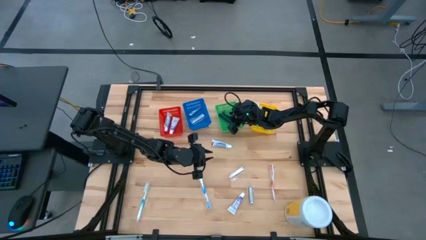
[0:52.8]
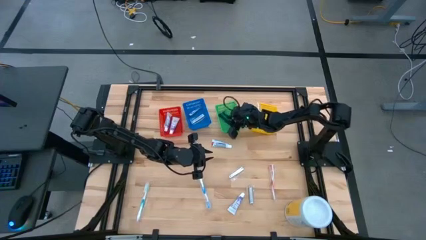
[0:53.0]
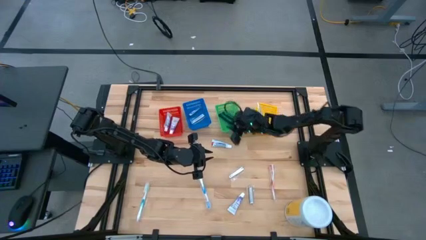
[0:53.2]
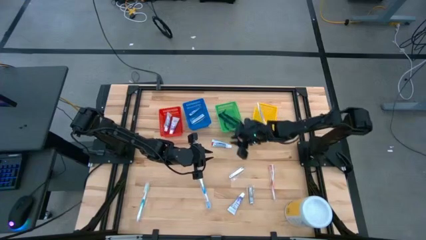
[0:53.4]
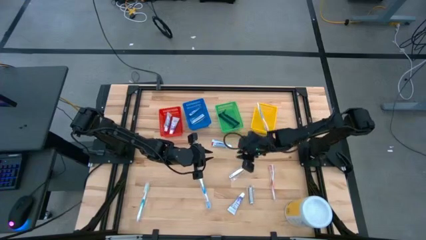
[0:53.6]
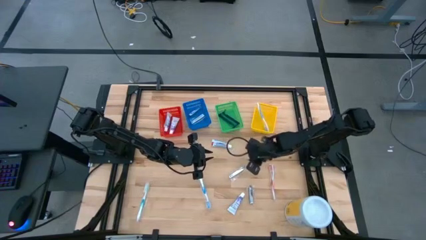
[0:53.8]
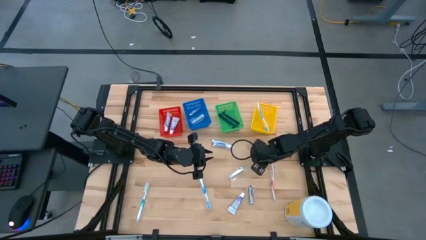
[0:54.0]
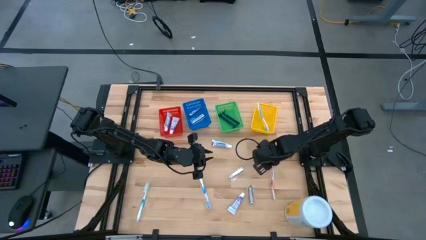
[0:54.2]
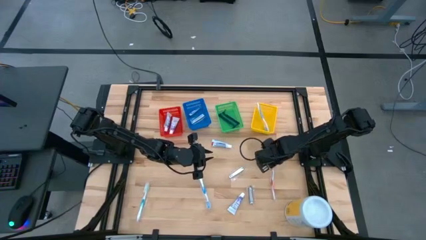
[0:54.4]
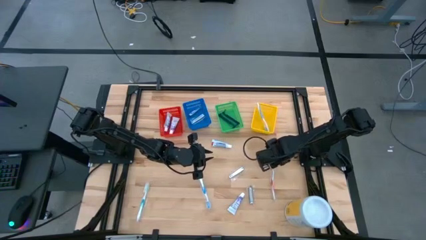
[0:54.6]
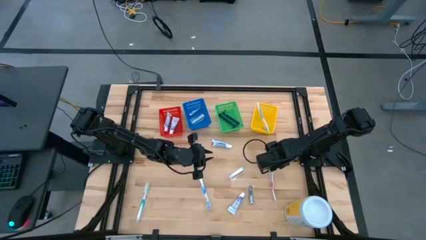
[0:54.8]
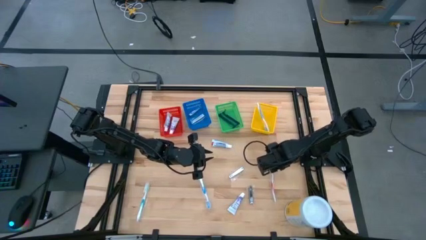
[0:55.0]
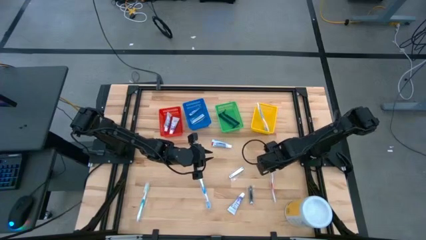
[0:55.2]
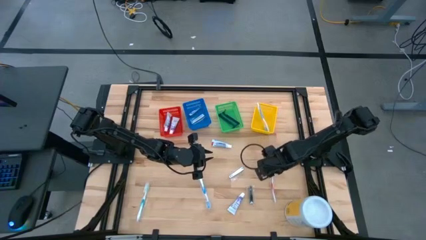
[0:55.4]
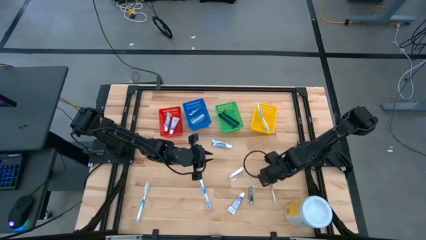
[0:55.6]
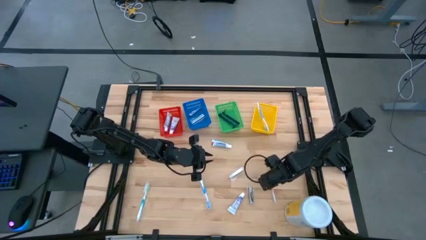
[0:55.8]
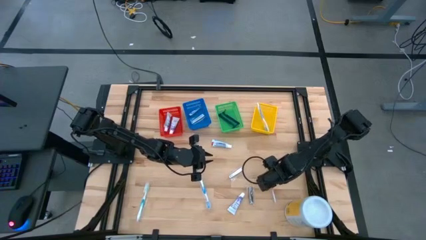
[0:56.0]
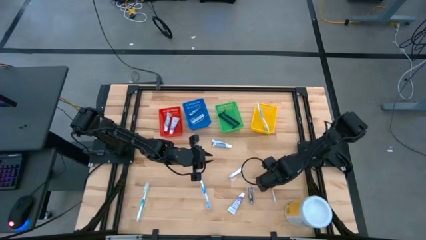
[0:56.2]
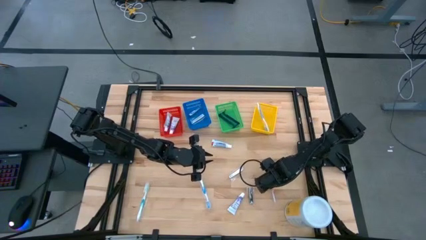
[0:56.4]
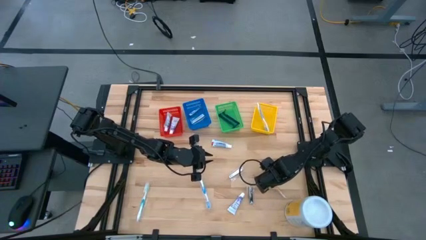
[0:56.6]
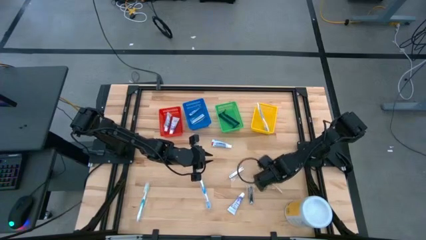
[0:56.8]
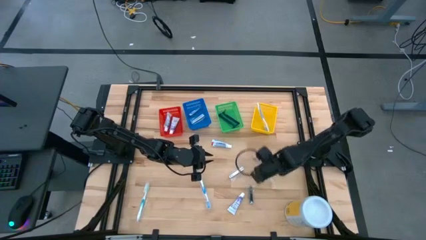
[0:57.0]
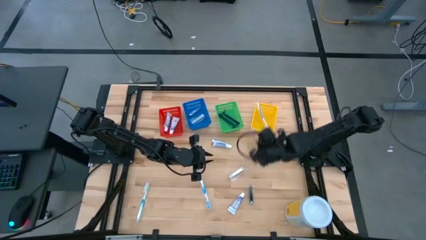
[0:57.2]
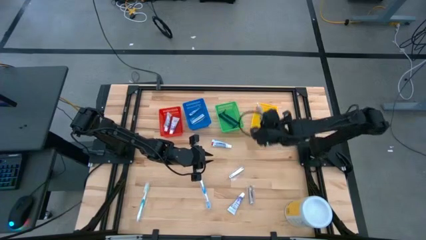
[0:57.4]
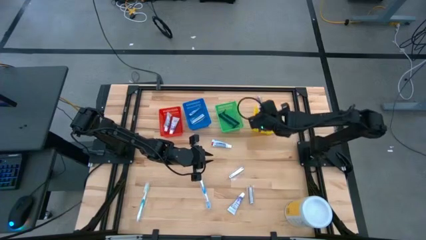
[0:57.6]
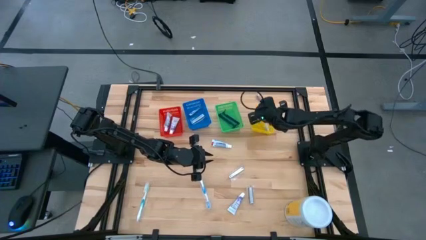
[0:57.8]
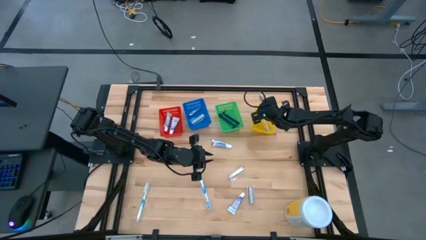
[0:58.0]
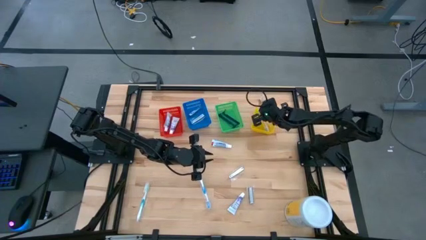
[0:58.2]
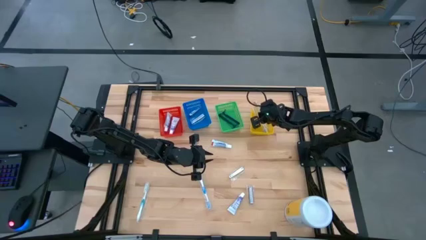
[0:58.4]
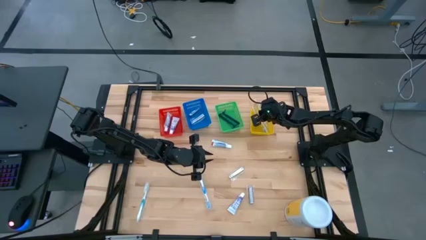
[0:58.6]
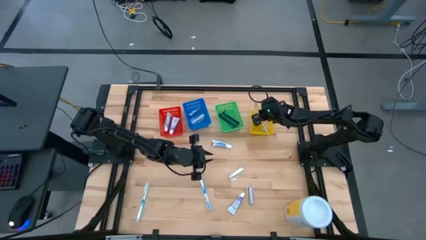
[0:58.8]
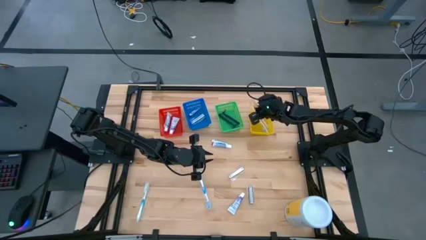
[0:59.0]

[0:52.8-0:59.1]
Task: Pick & Place Travel size toiletries
Put the orange toothbrush into the yellow bin

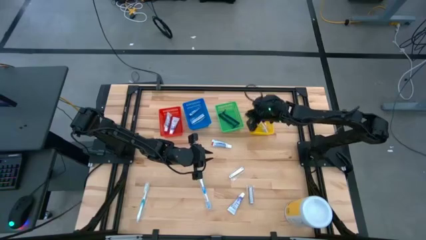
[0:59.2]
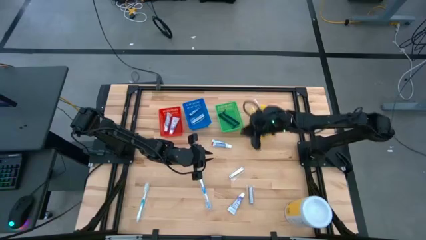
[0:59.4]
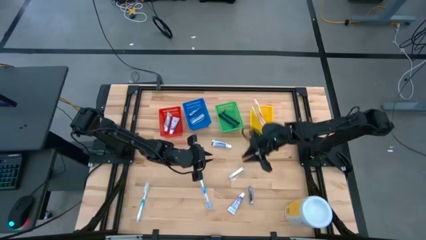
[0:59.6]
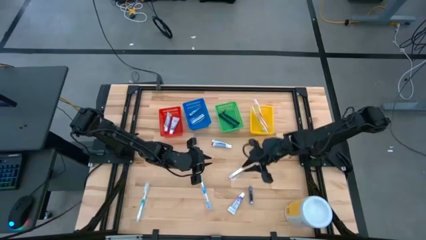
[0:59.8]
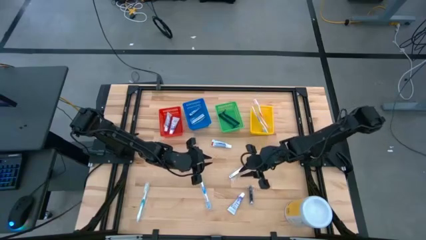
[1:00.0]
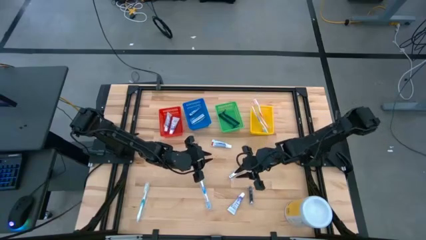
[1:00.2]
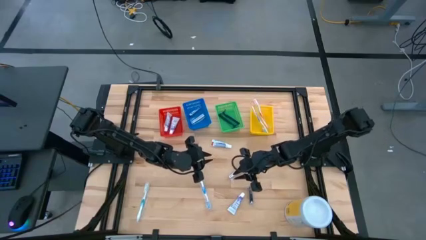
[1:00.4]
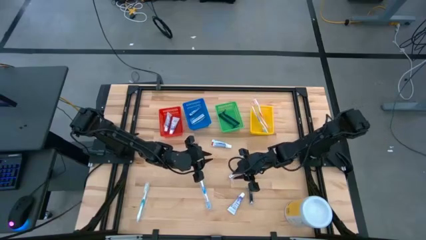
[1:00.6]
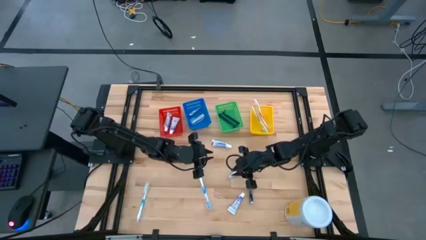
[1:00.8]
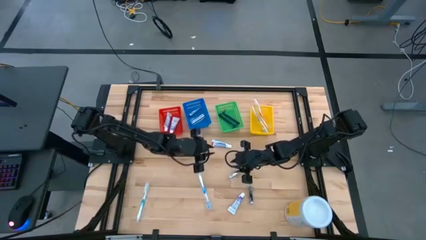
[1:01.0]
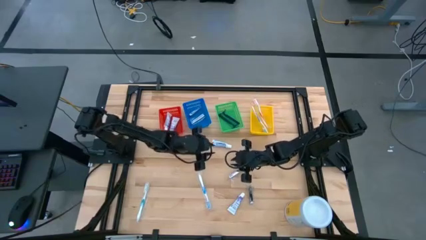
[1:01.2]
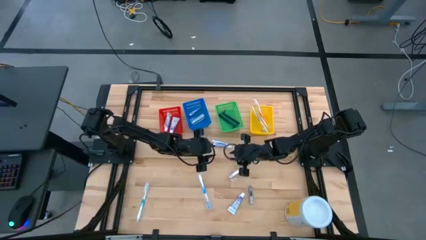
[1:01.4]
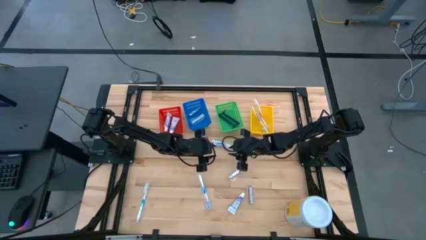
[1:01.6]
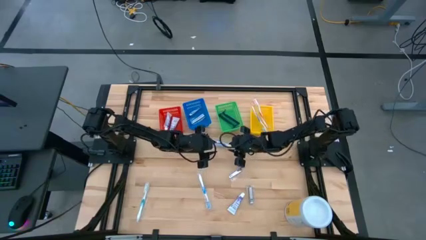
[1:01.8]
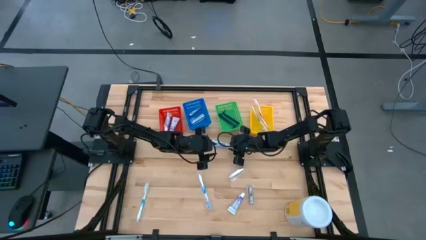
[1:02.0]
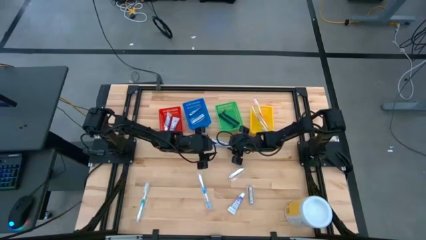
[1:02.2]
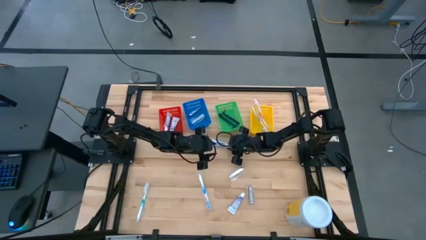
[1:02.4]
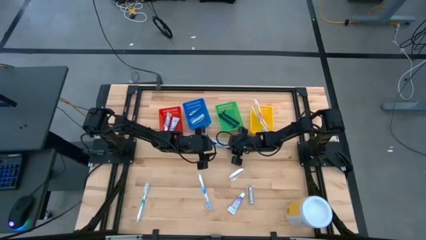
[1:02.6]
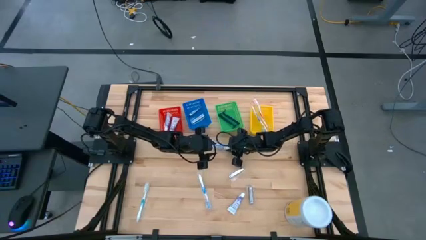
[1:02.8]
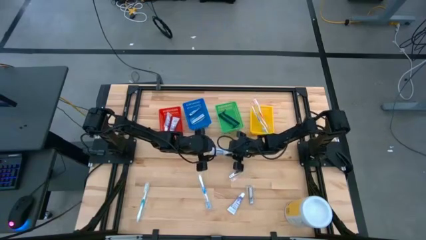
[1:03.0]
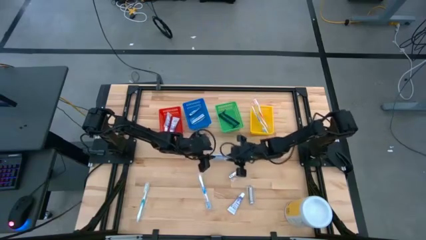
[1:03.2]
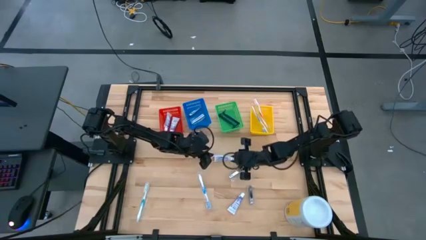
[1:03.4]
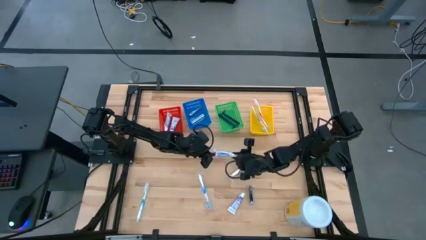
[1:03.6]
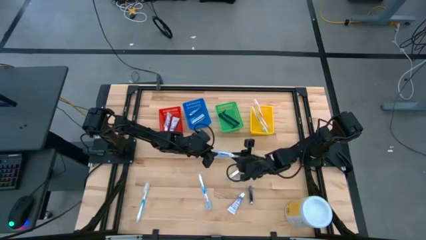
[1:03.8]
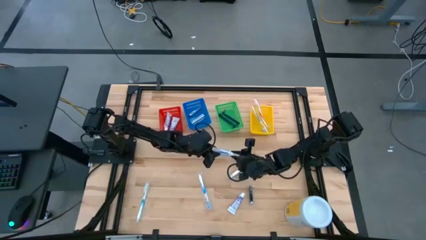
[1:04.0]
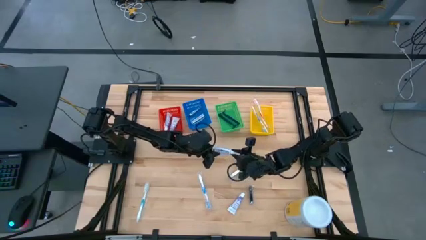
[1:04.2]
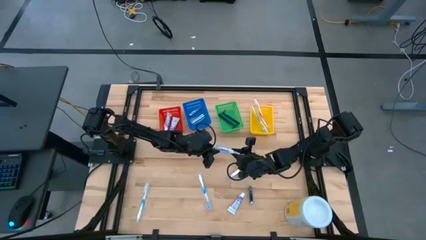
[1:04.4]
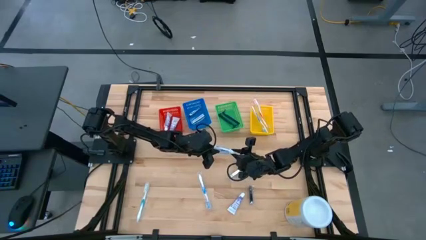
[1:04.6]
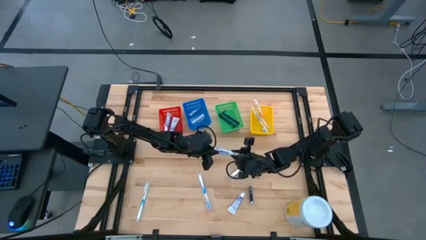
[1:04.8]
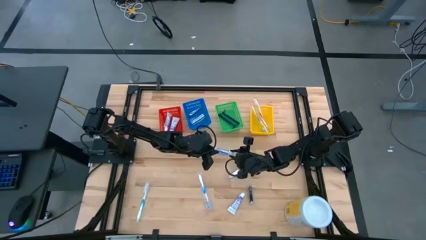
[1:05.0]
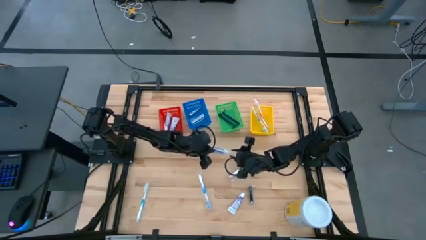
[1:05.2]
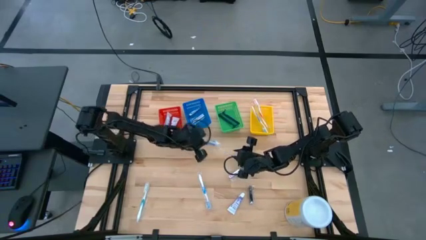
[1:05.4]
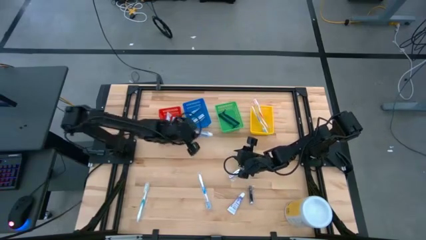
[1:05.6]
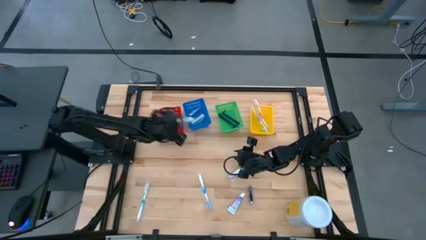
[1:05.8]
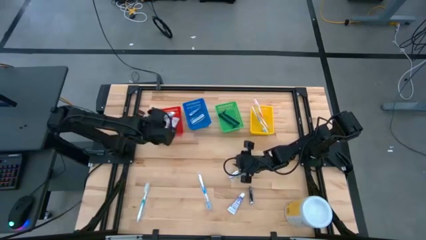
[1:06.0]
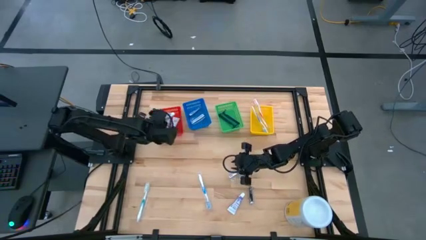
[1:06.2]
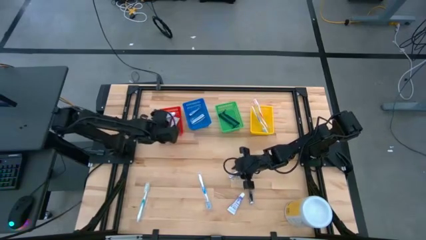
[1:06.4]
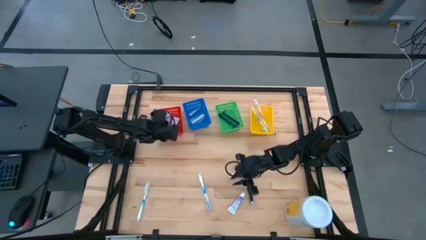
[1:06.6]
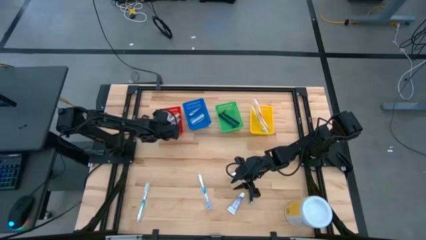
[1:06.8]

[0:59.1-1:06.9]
Put the toothpaste into the red bin

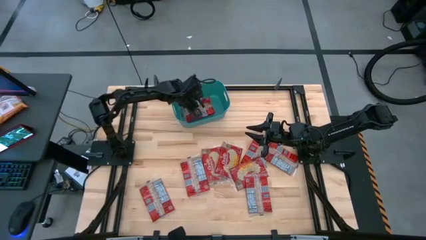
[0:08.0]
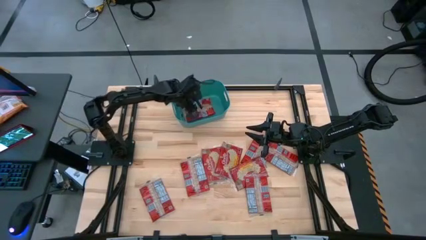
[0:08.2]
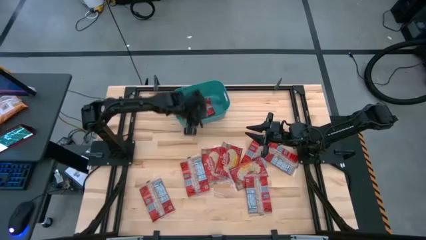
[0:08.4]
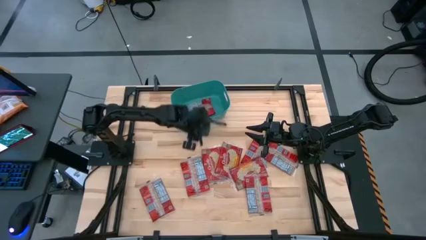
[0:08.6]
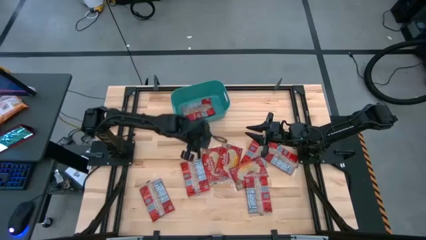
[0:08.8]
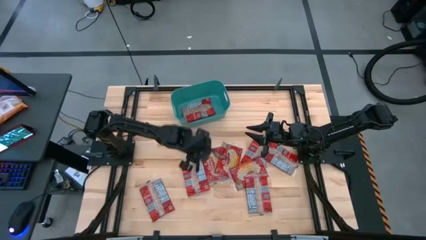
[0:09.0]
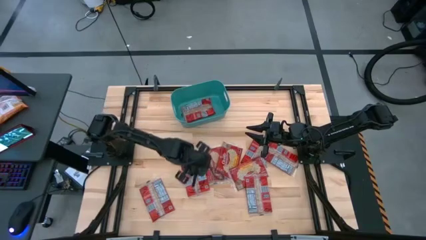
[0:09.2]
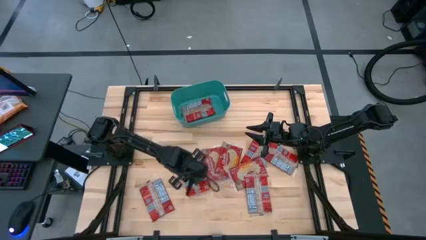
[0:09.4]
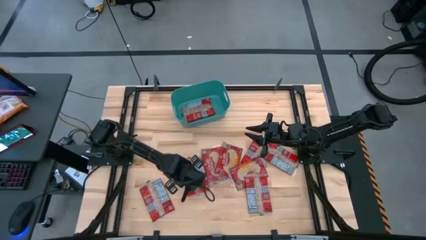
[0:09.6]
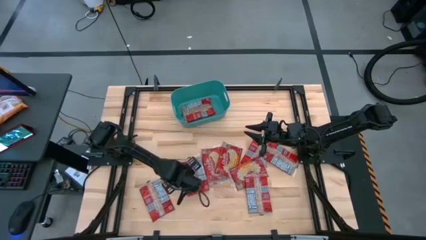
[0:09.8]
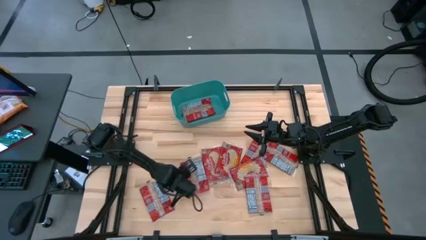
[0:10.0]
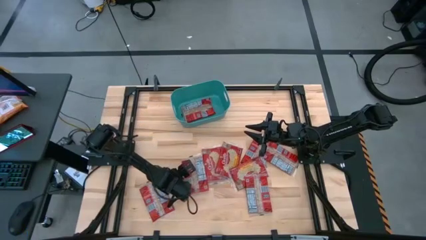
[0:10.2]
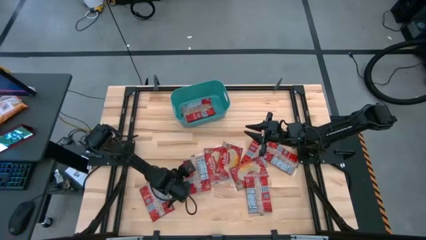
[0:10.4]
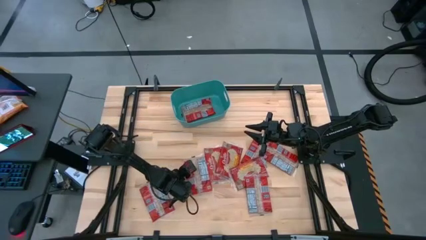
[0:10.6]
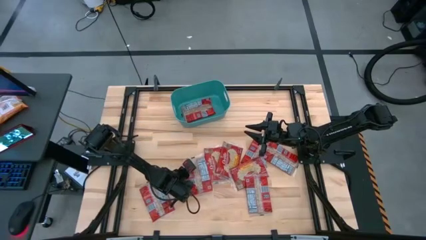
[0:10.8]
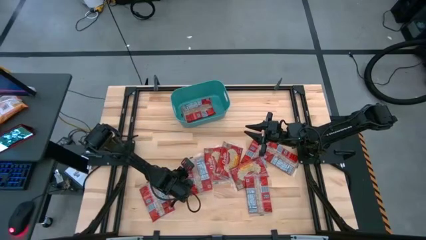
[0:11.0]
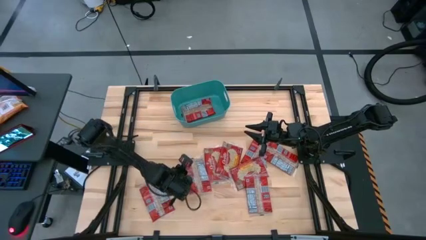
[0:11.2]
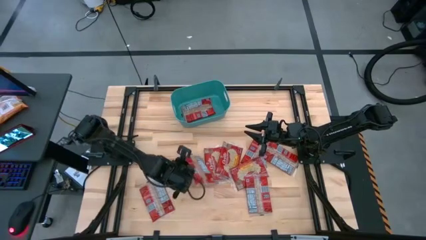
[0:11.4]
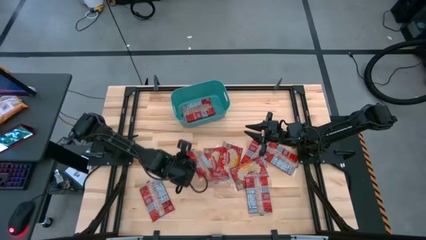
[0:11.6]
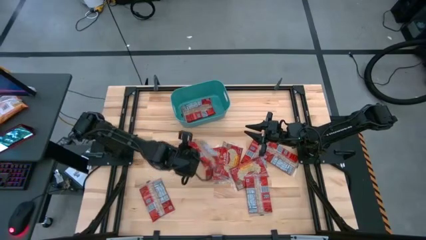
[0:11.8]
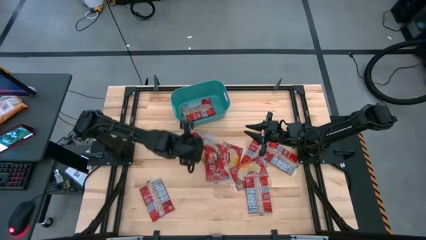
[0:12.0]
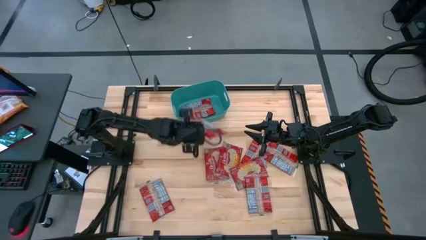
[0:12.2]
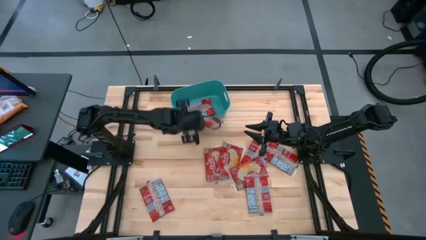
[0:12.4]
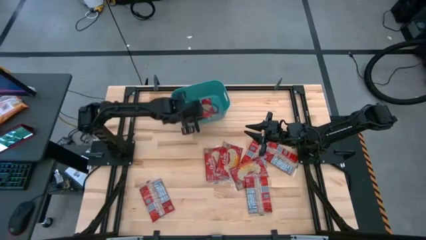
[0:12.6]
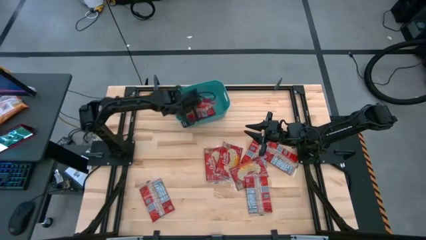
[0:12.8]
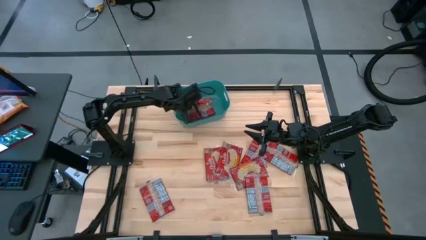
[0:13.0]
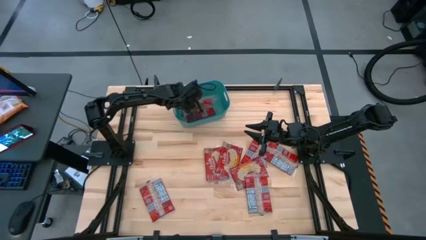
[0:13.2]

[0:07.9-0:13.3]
Task: Sort popcorn bags into baskets
Put the red popcorn bag into the green bin
